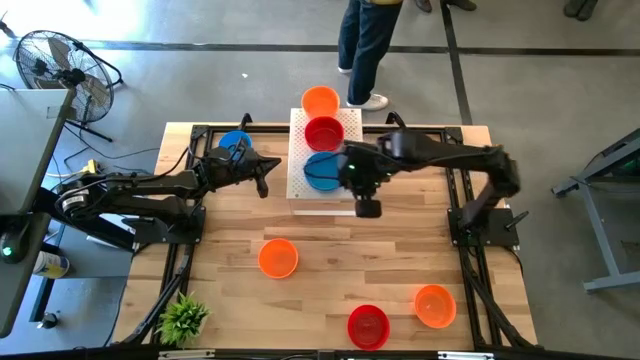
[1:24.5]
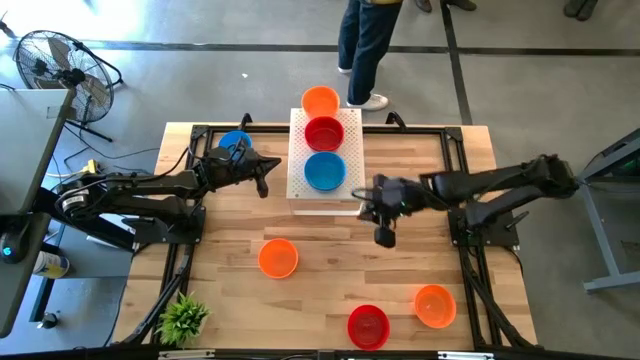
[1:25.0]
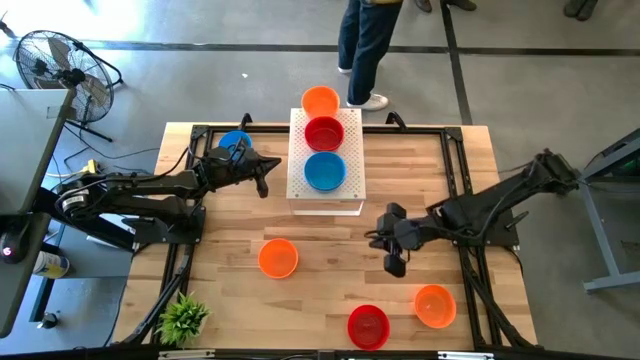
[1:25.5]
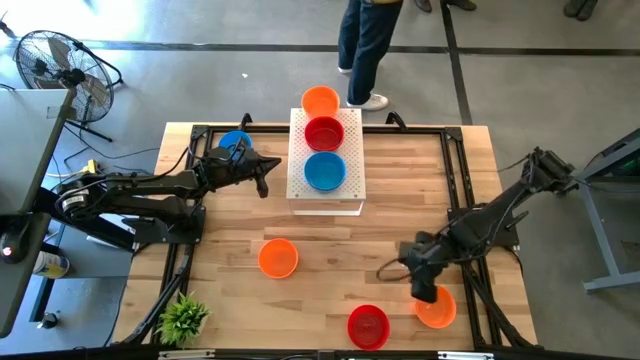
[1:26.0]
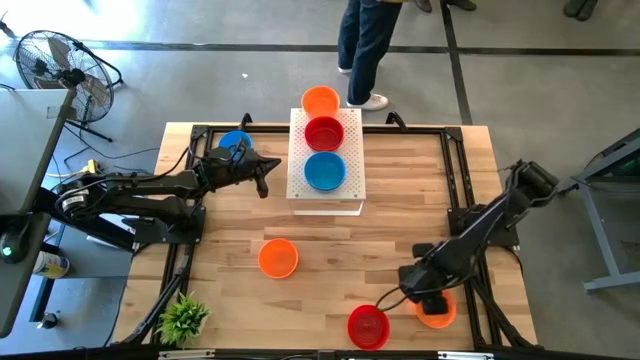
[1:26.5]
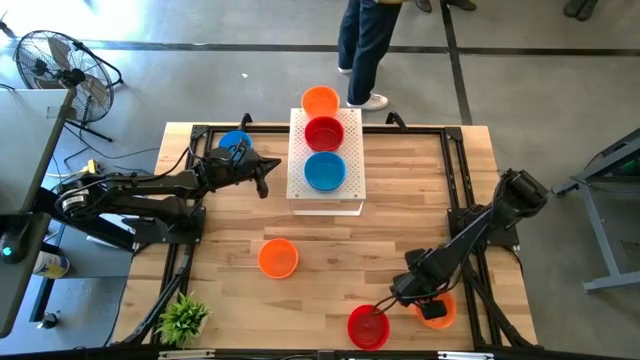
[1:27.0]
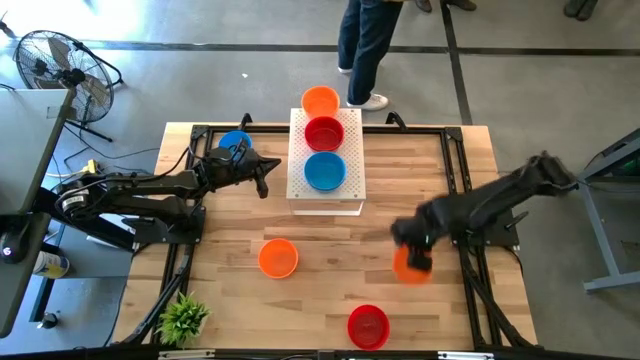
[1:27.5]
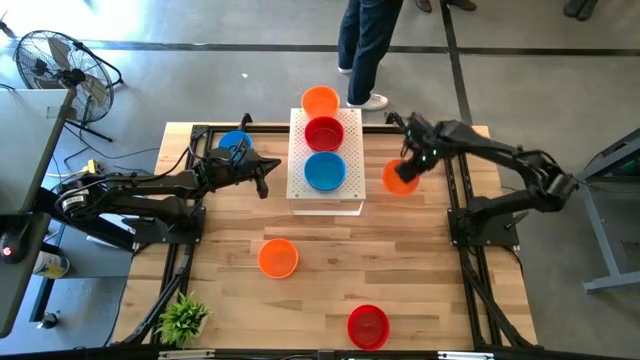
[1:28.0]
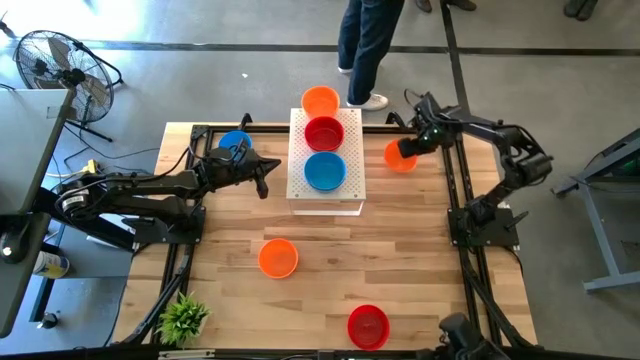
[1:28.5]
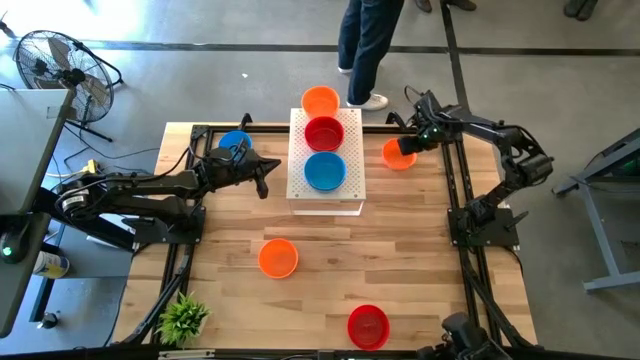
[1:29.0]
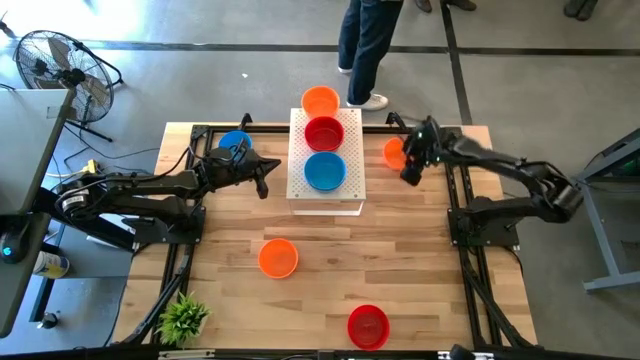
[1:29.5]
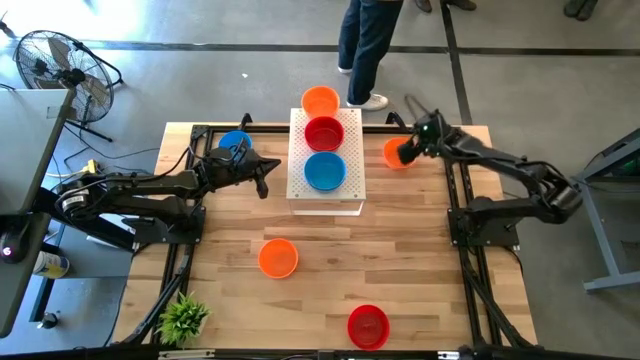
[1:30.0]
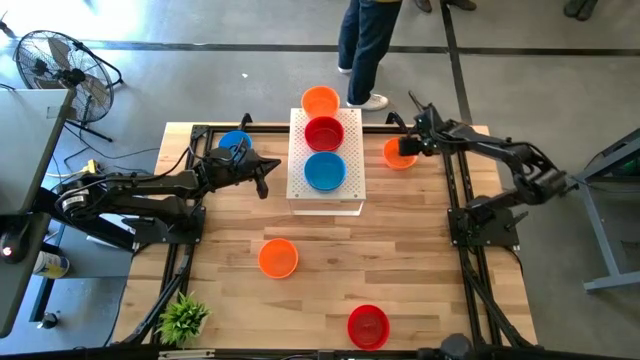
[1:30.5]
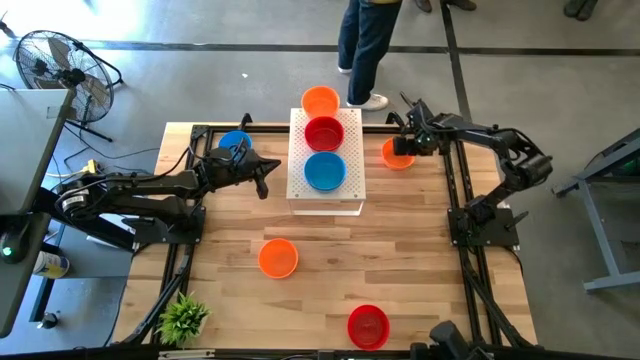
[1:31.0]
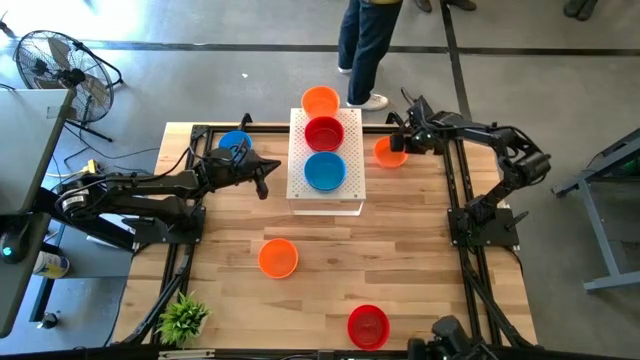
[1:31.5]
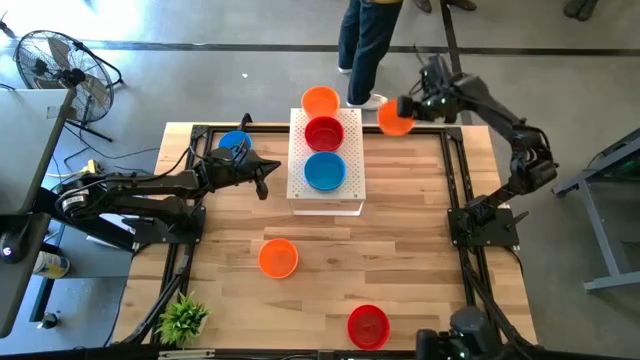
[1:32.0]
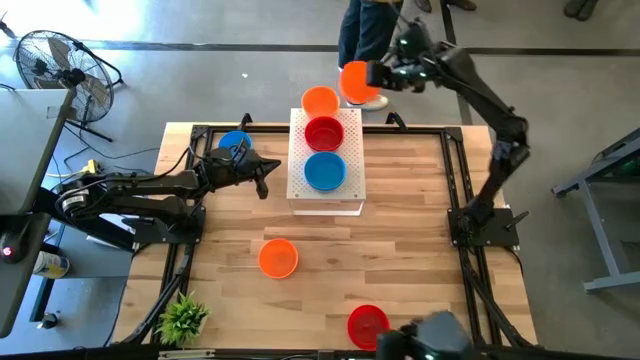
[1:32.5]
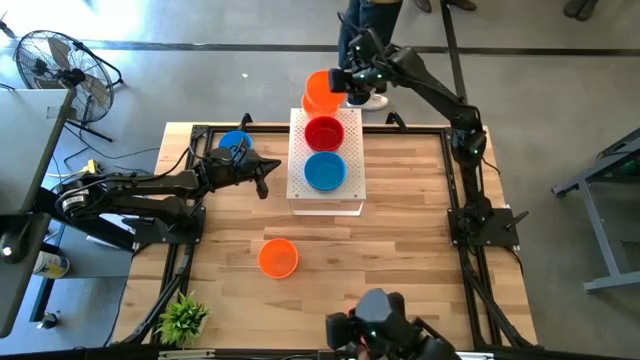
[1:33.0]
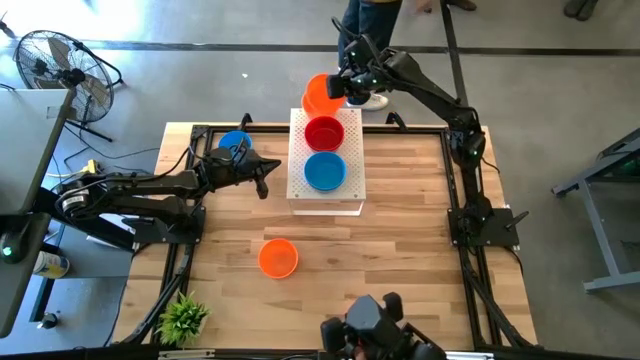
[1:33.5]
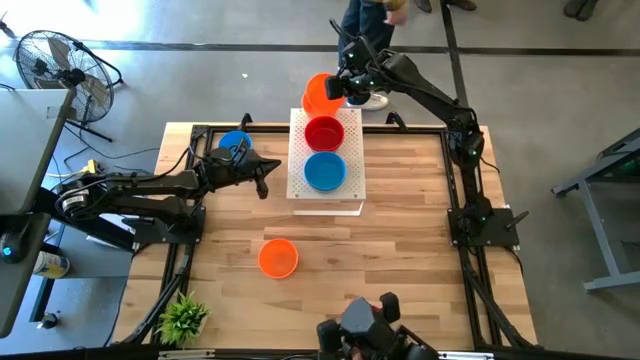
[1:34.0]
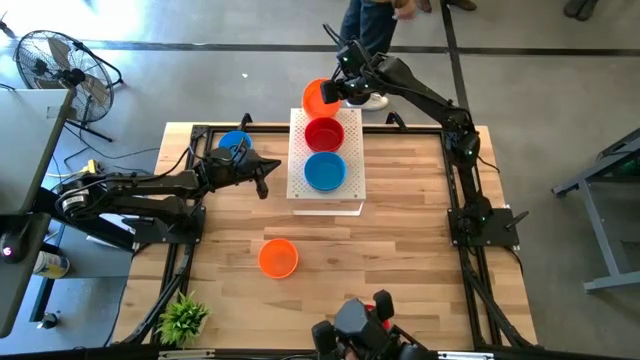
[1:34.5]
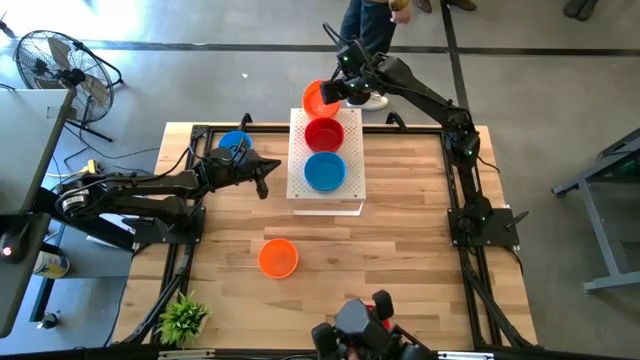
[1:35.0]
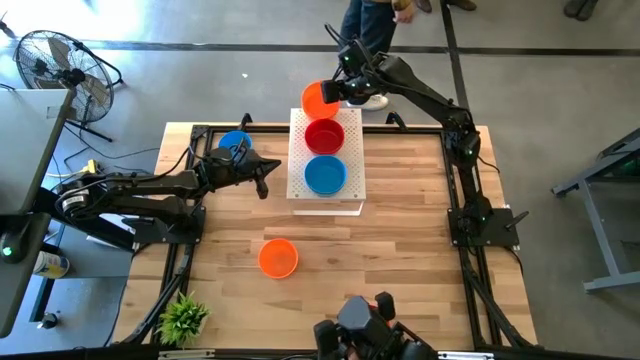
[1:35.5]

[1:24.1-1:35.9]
Task: Pick & Place Mini bowls
Stack the orange bowl on top of the other orange bowls on the shelf

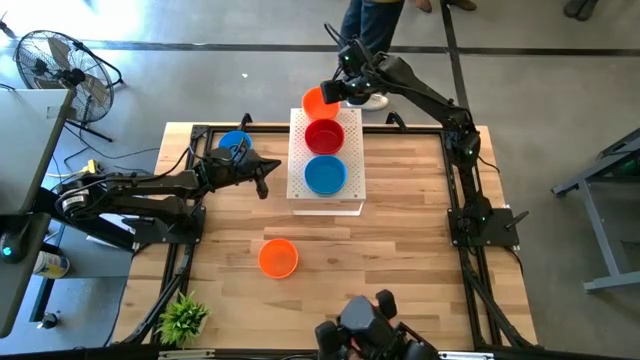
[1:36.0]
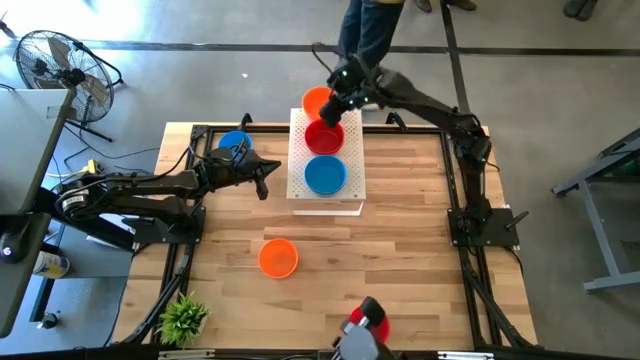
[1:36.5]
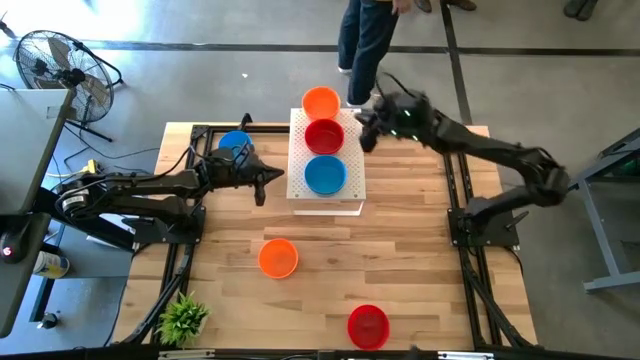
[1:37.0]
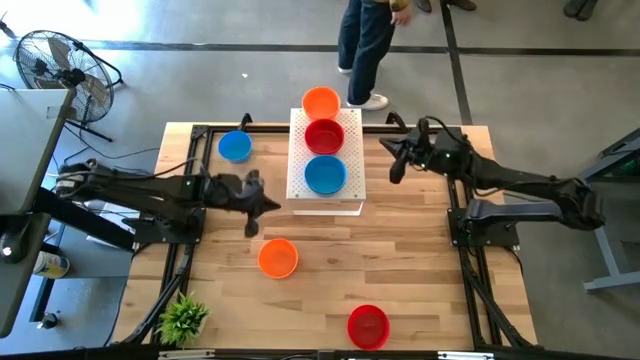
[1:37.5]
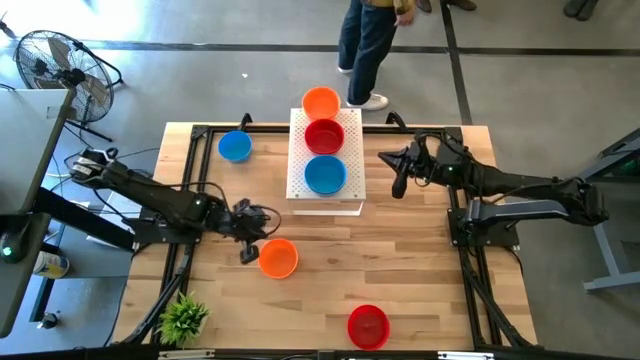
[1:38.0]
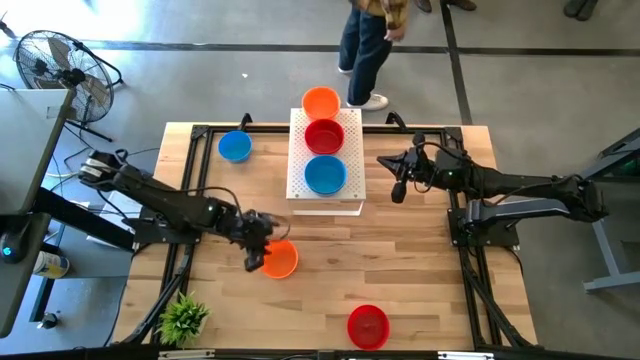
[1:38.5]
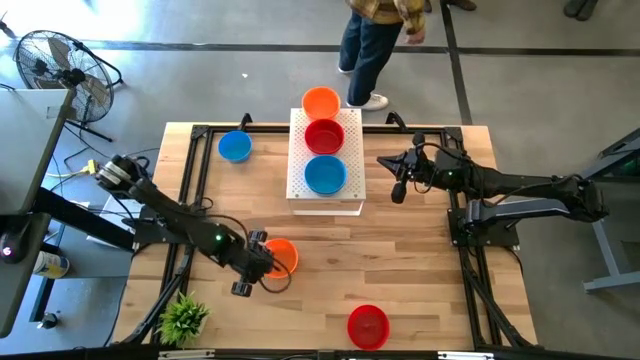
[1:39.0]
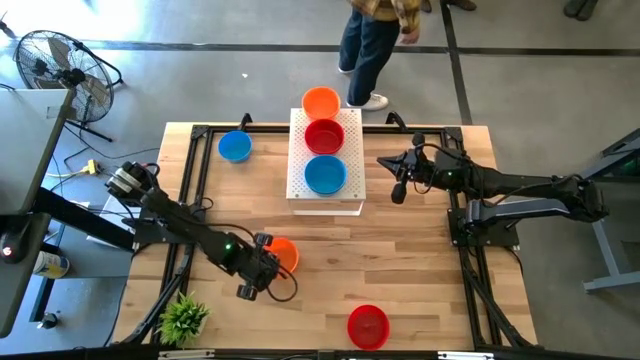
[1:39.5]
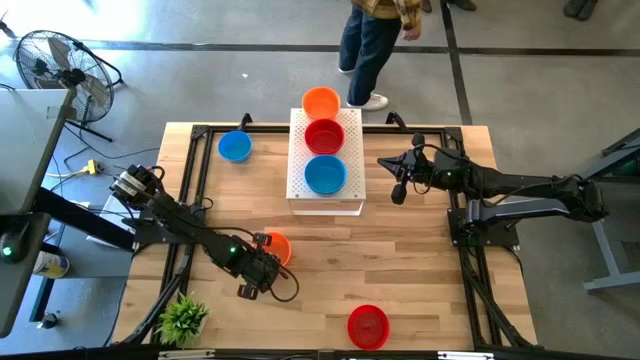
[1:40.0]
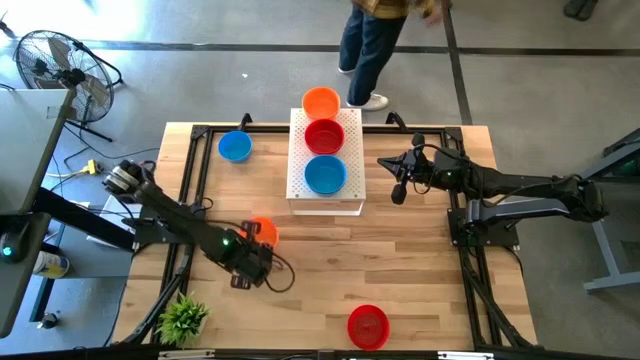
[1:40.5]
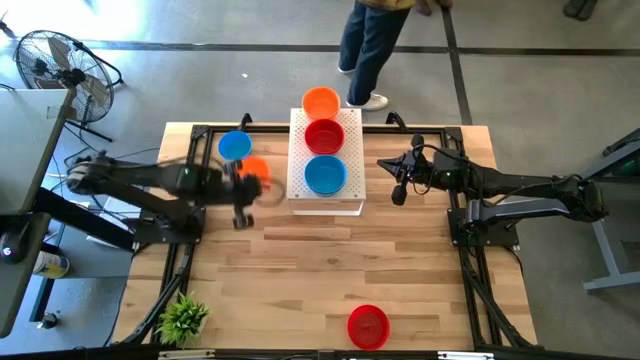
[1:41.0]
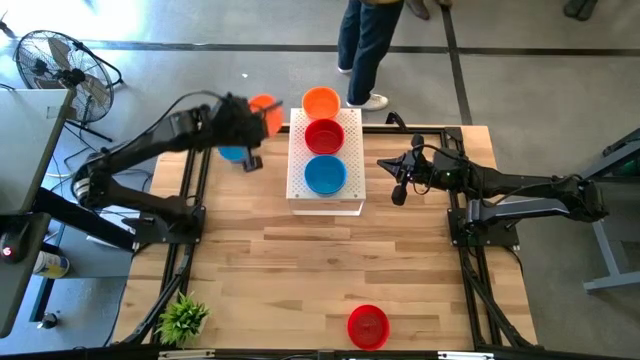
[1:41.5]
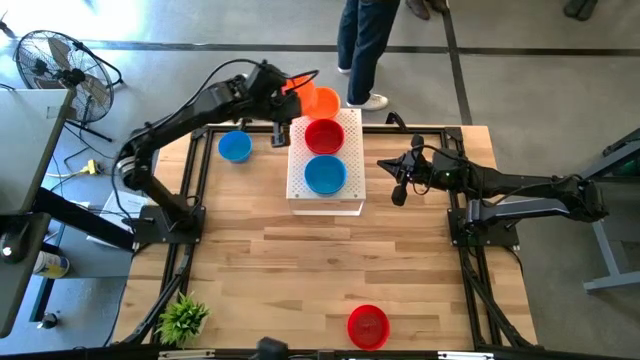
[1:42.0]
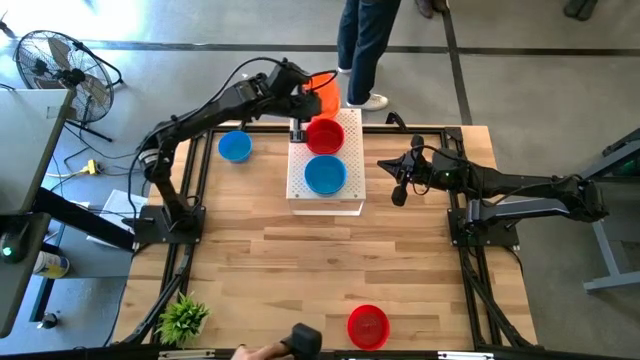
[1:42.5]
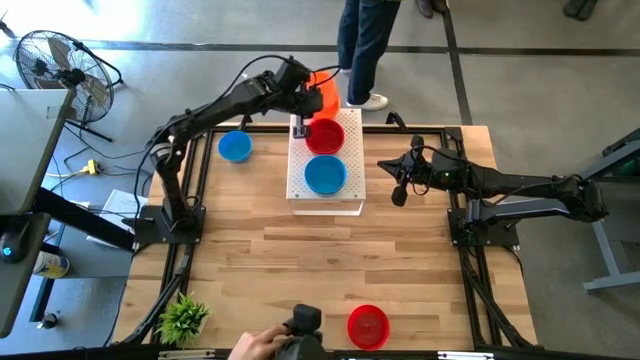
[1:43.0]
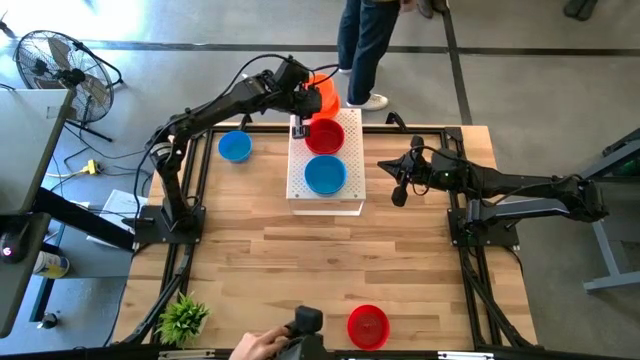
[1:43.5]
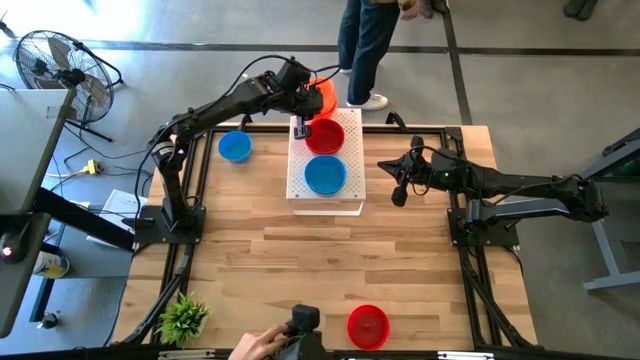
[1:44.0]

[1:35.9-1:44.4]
Stack the orange bowl on top of the other orange bowls on the shelf

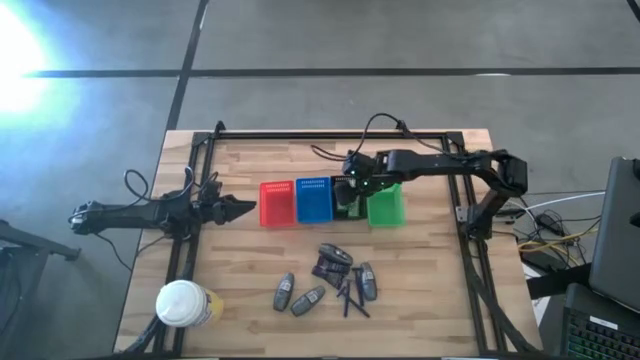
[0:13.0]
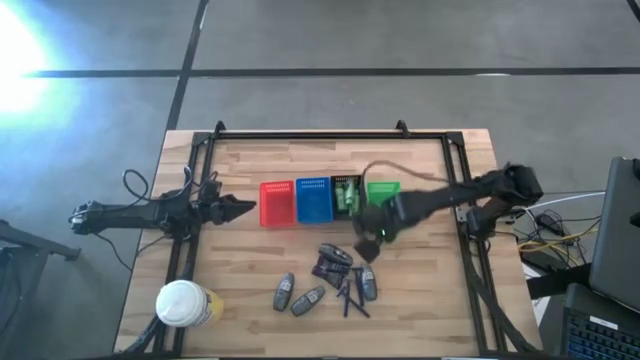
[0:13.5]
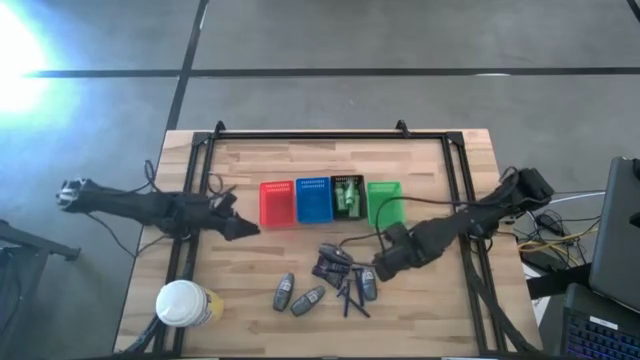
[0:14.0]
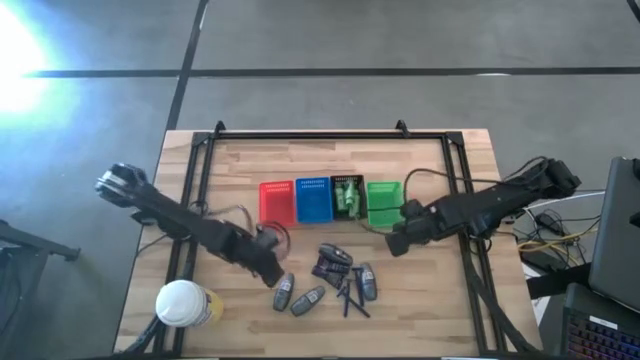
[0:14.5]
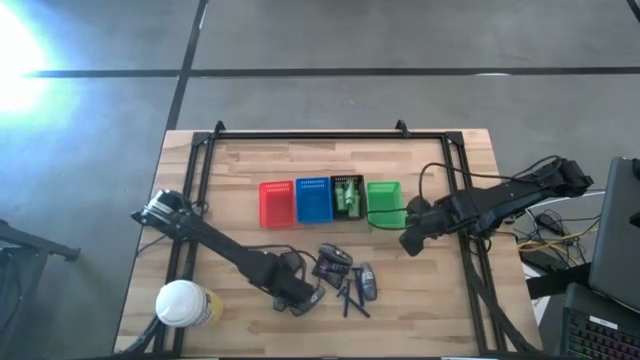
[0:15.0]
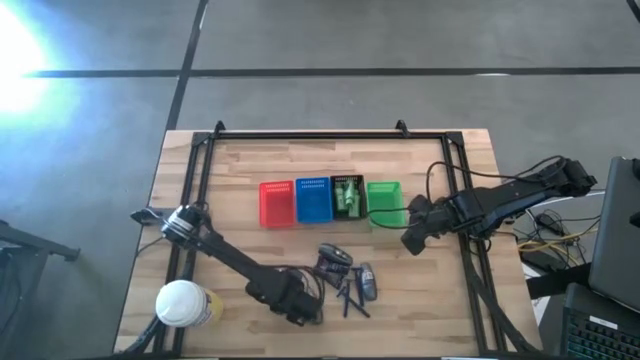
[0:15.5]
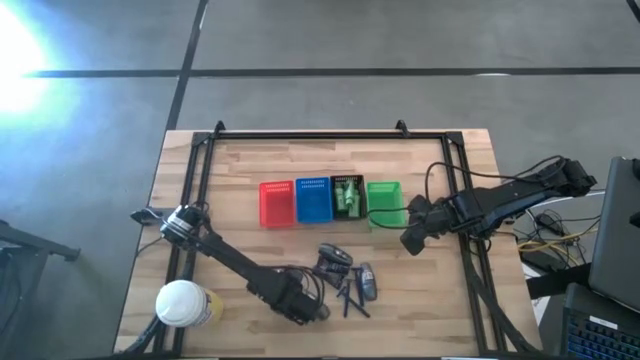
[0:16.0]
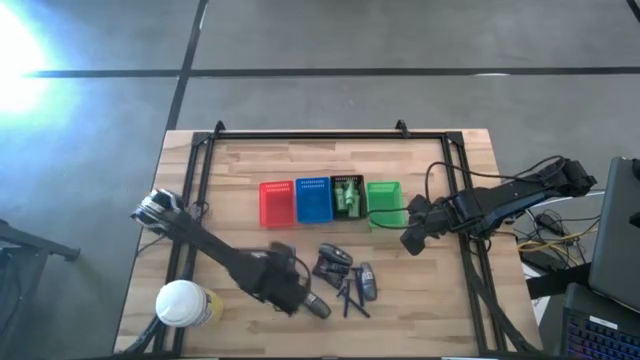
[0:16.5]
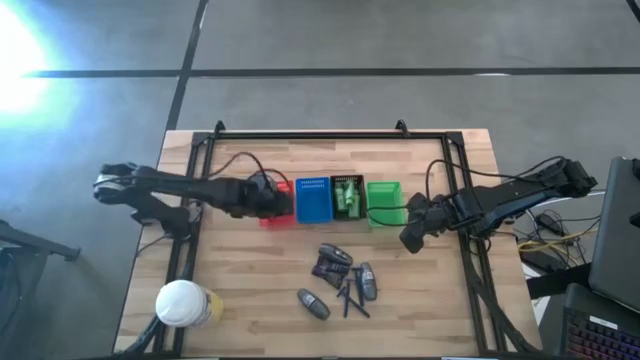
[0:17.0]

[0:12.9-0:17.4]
Task: Pick & Place Travel size toiletries
Put the black deodorant into the red basket
